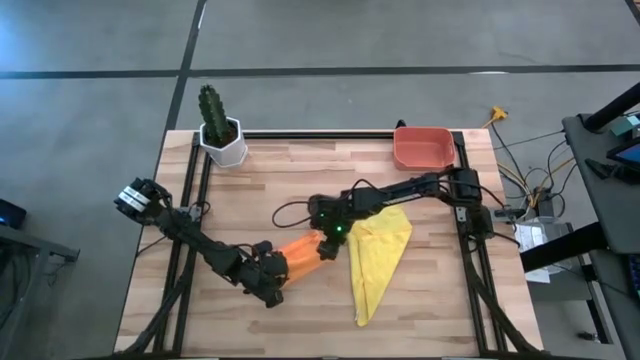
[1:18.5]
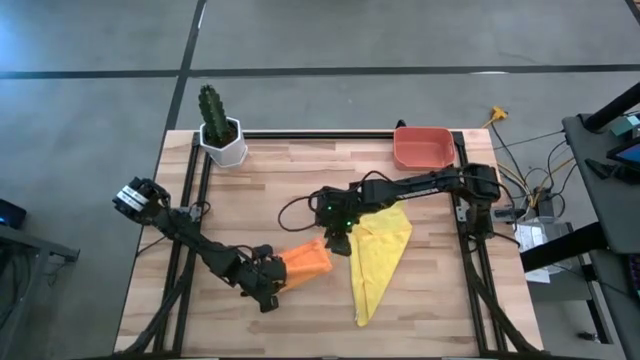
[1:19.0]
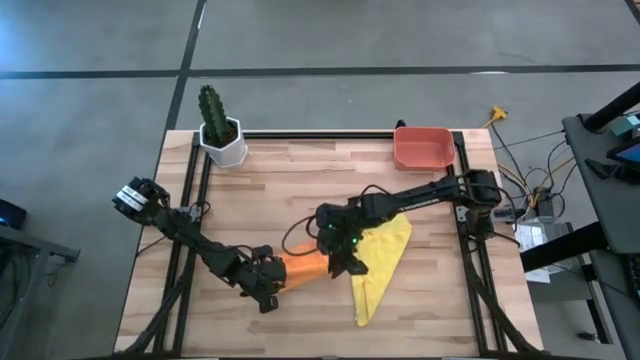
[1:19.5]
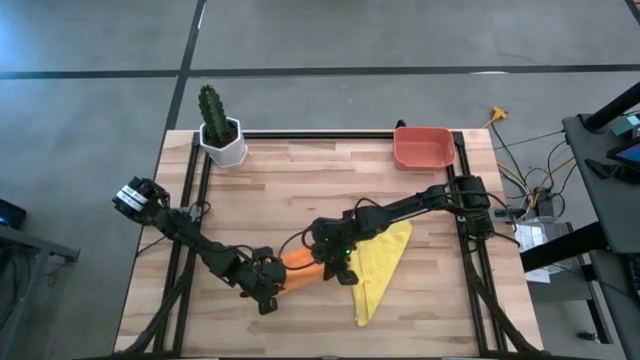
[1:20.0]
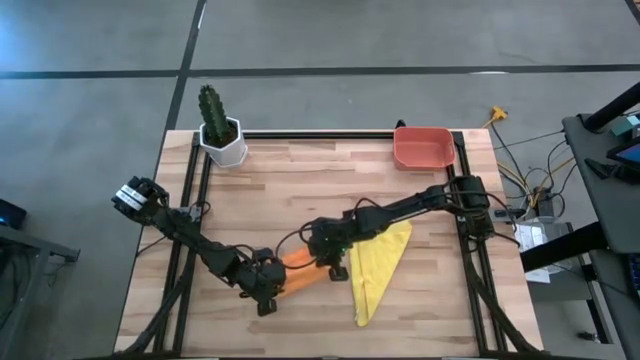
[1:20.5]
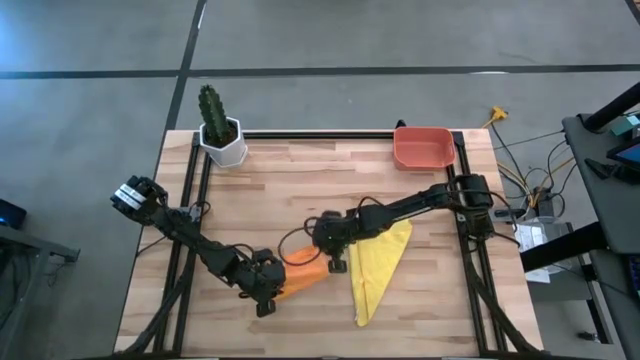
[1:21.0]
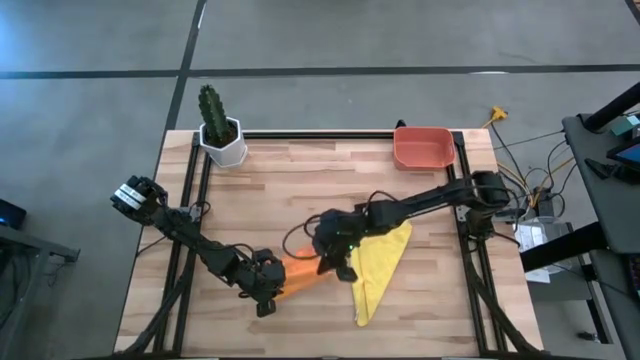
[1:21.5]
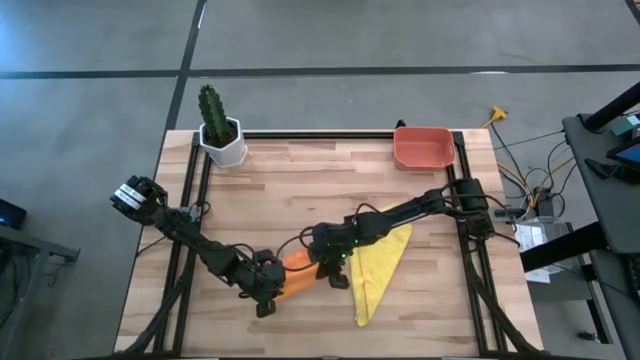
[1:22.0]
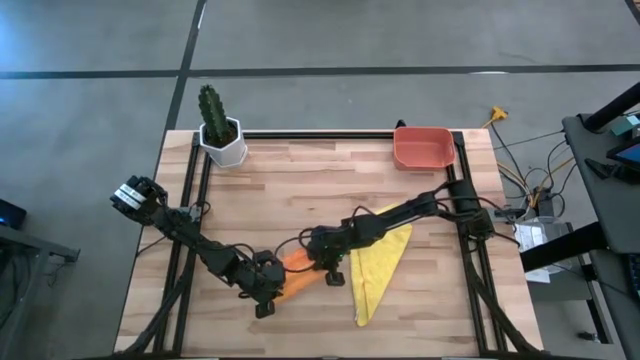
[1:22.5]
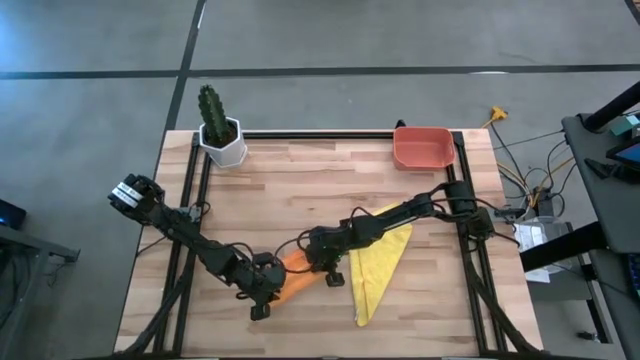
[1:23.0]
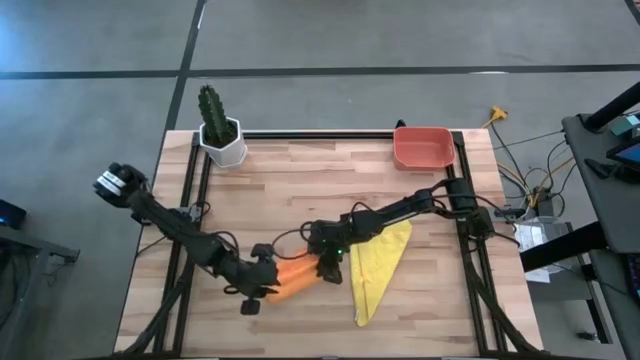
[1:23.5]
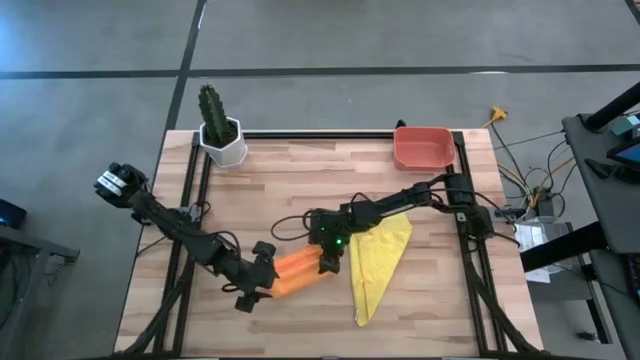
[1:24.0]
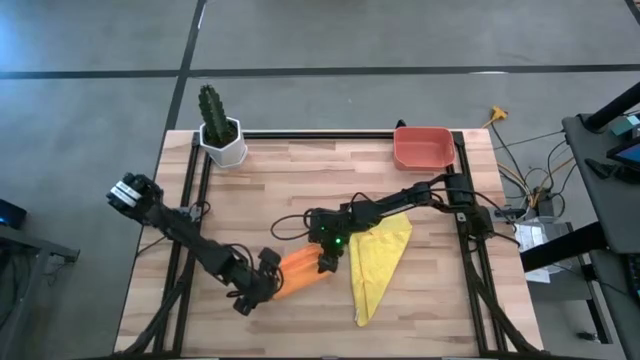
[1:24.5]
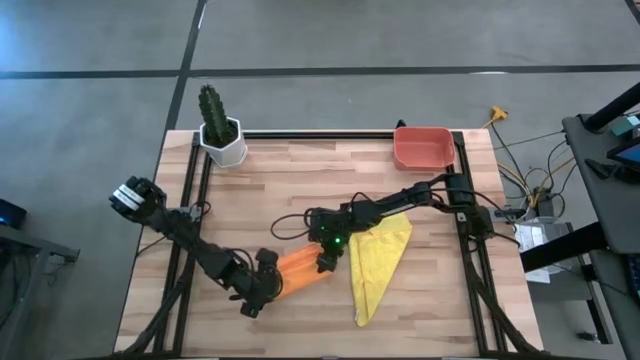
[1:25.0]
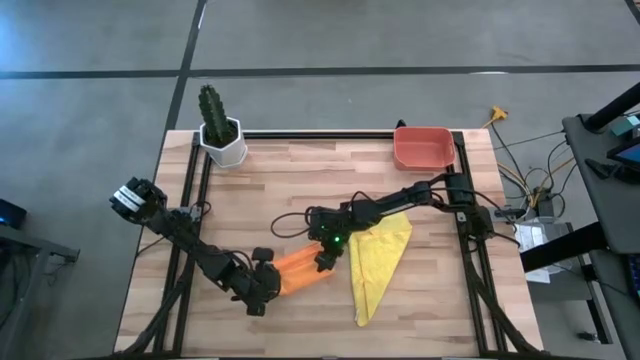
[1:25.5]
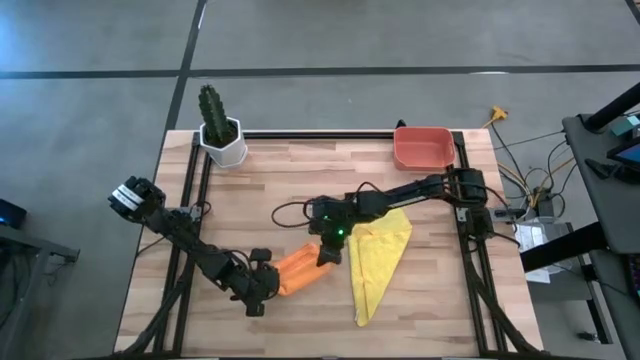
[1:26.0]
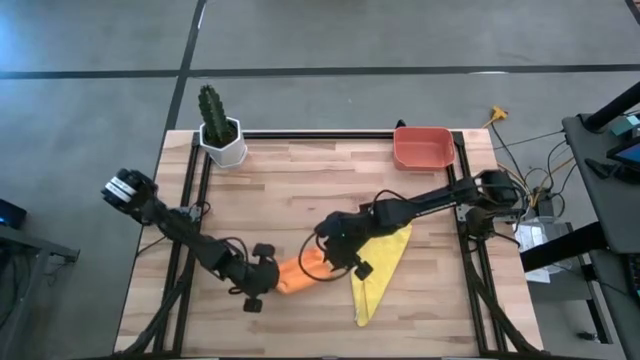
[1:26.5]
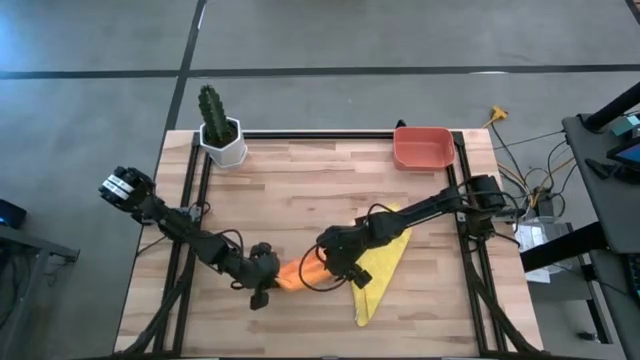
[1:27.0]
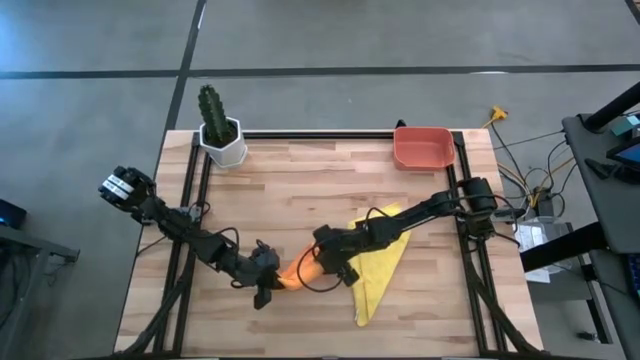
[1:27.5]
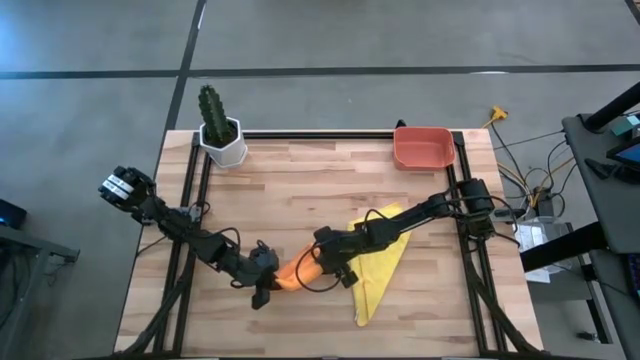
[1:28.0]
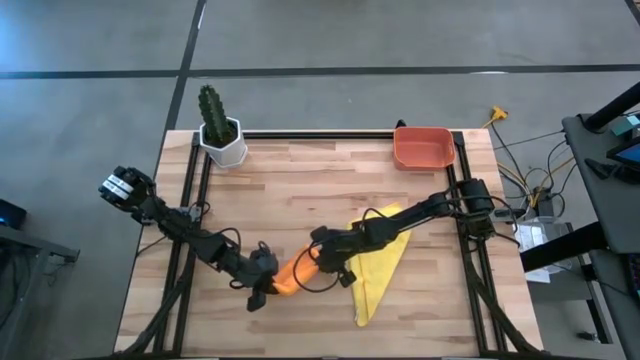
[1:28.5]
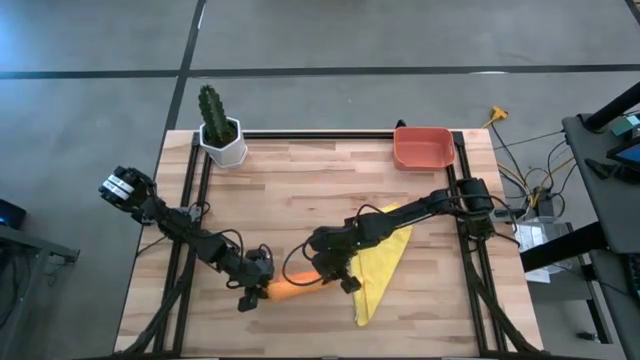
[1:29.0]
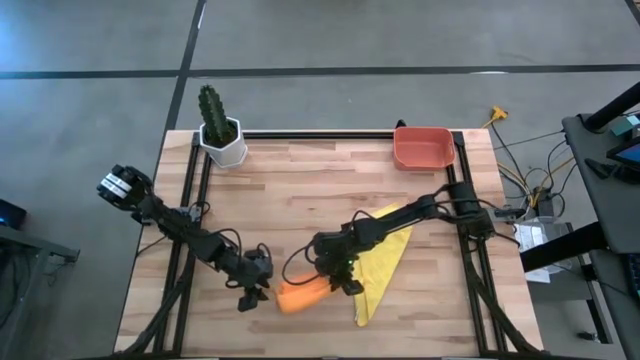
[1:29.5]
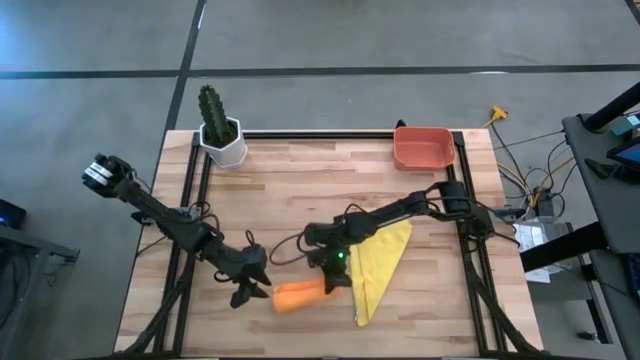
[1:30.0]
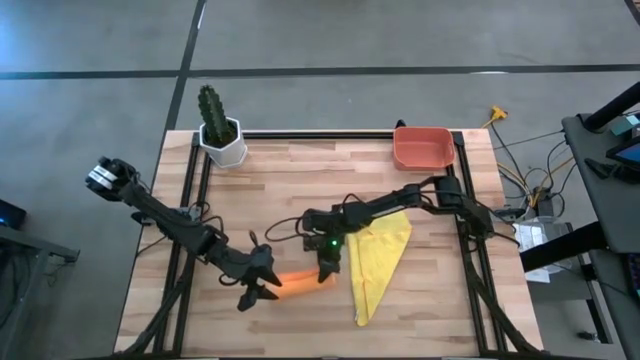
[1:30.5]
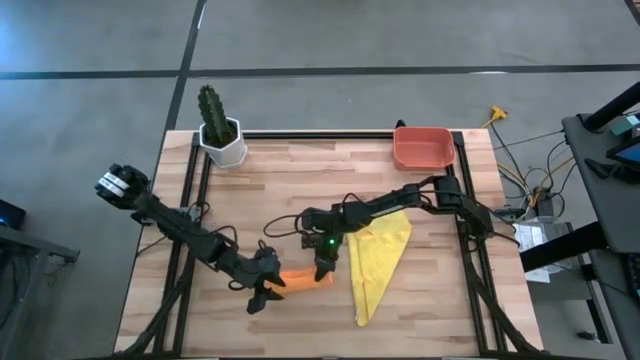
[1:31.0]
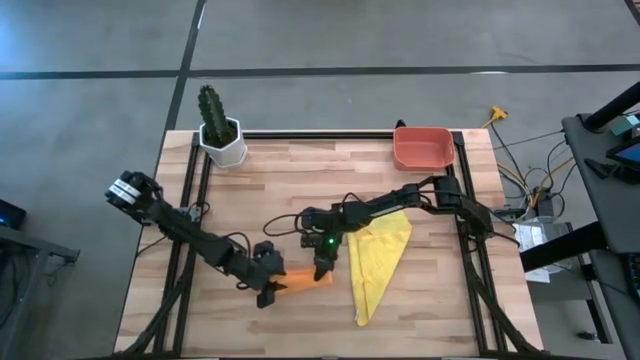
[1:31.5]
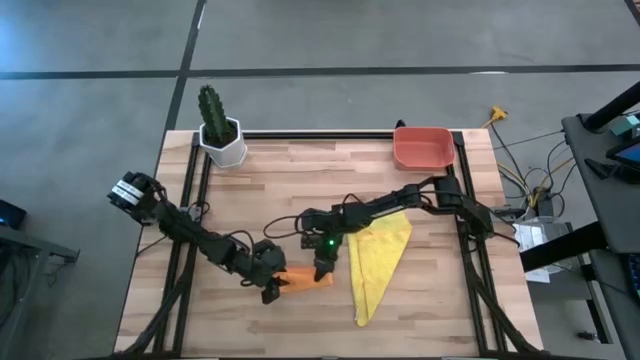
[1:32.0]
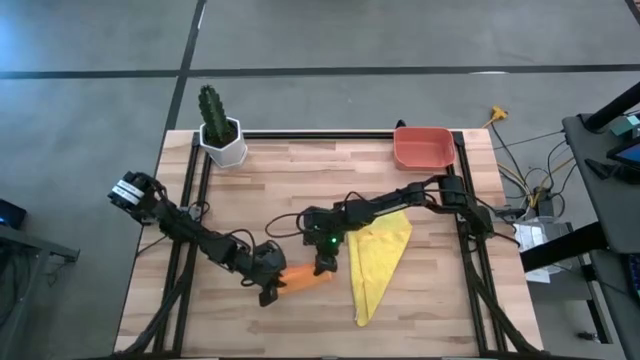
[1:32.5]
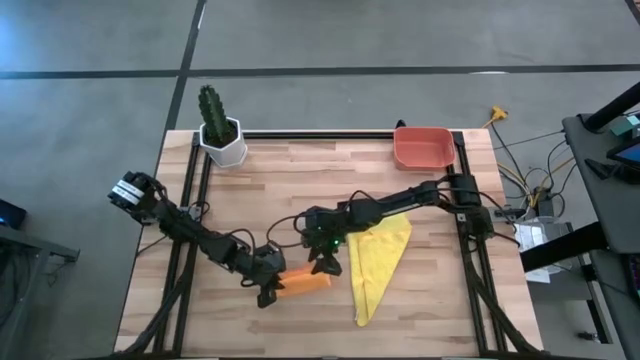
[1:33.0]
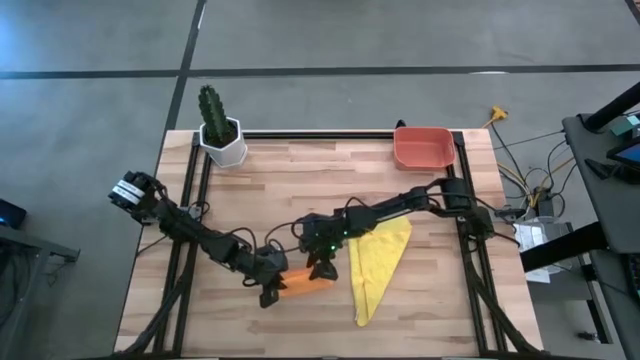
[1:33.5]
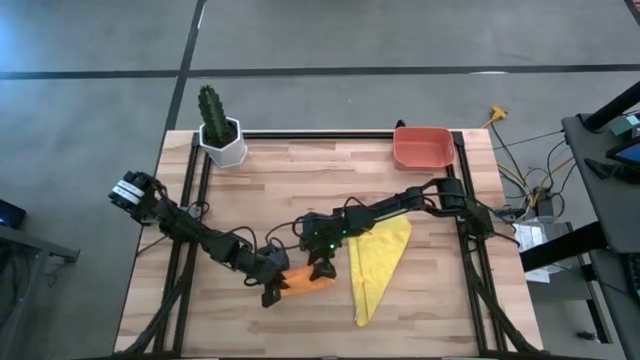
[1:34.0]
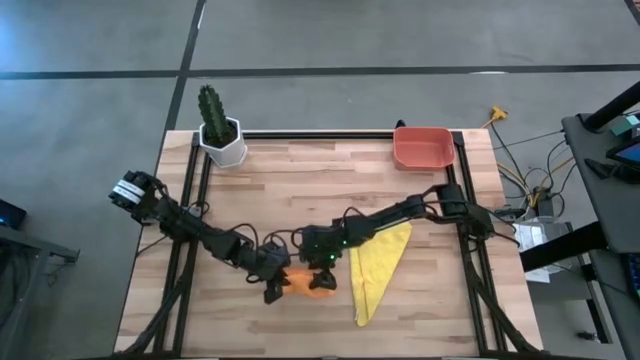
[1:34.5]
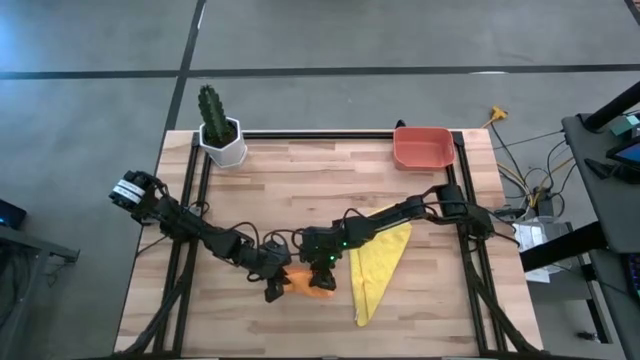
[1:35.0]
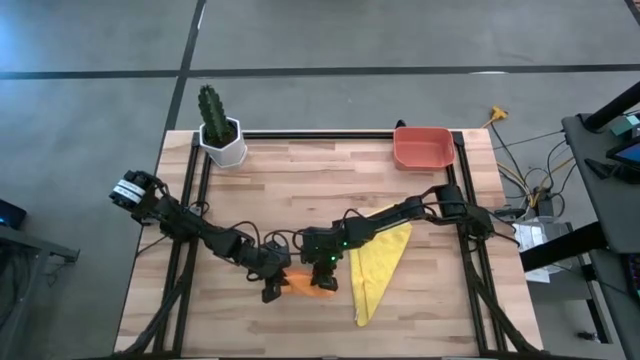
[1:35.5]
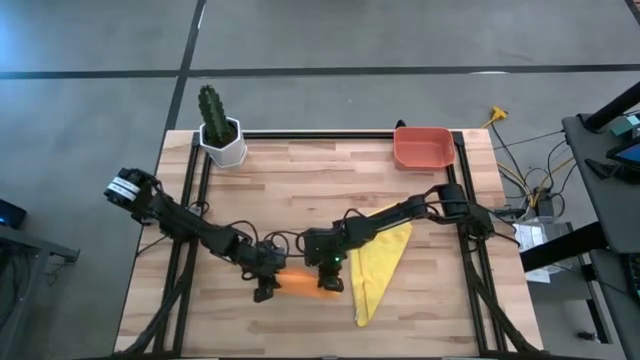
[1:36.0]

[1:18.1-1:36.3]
Task: Roll microfiber towels into tight, uniform cylinder then place into a basket
Roll the orange towel
